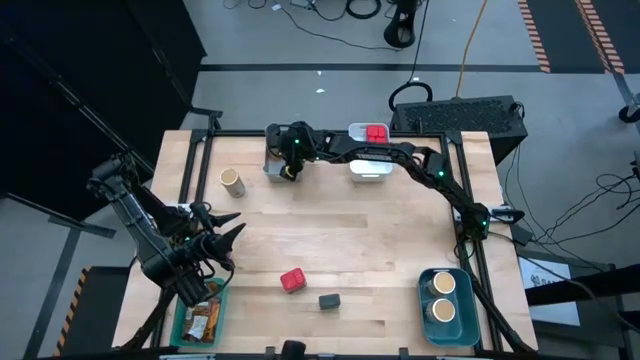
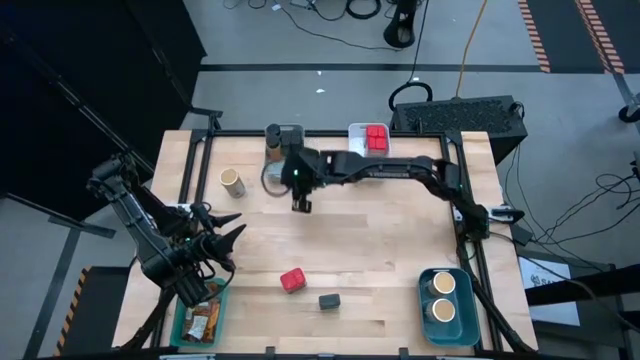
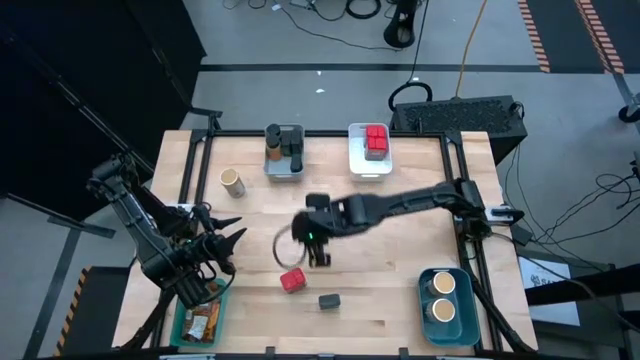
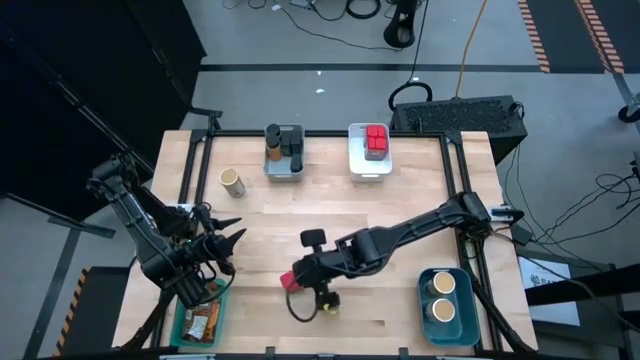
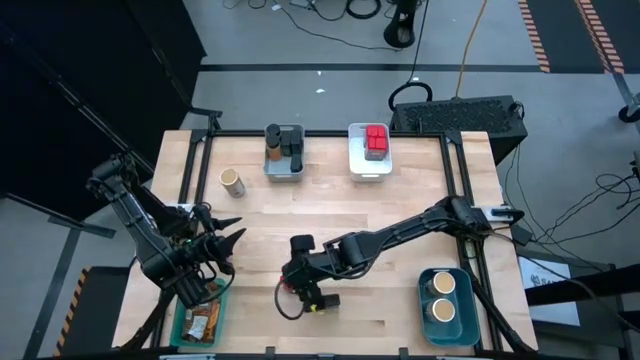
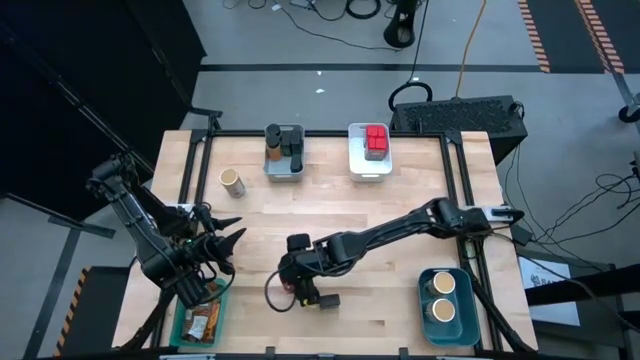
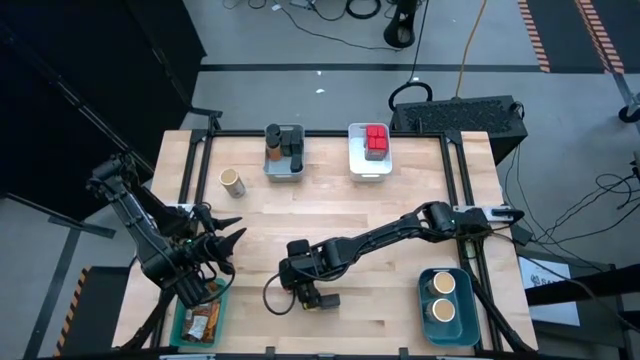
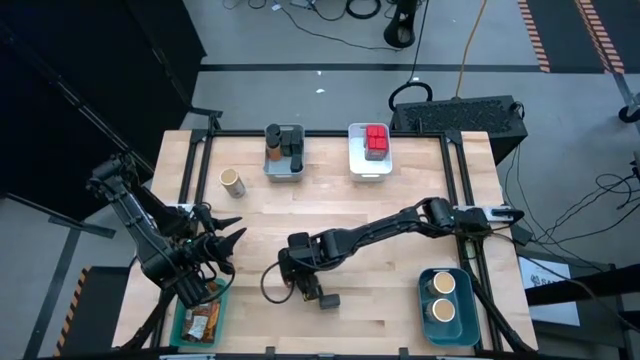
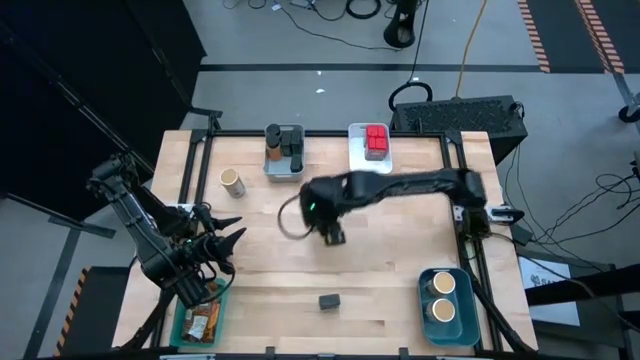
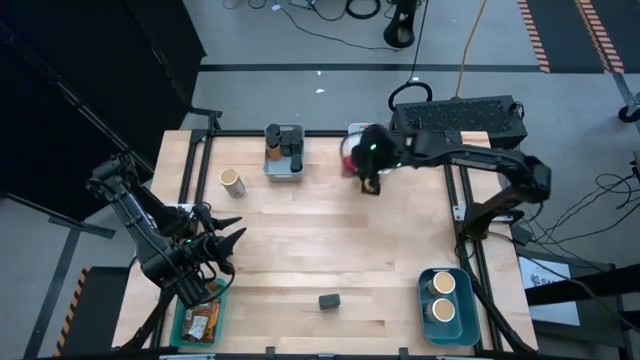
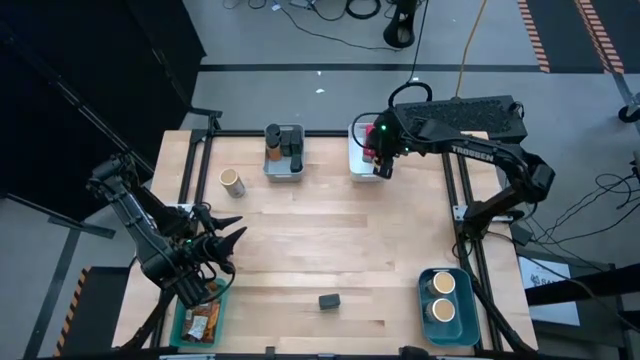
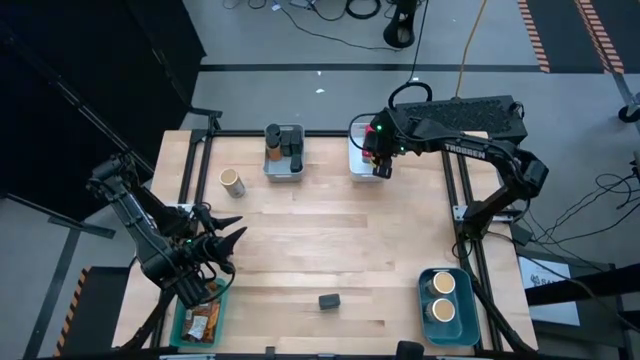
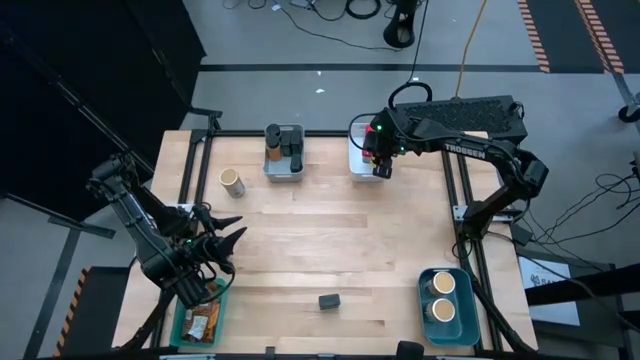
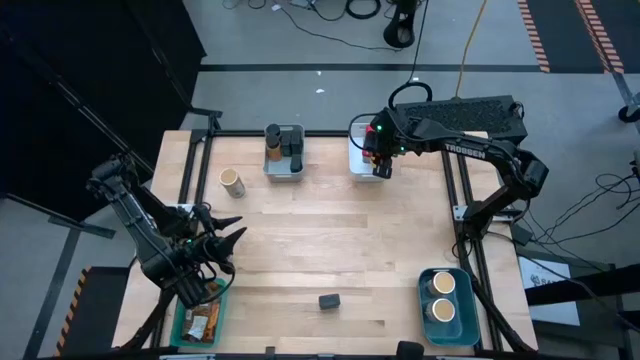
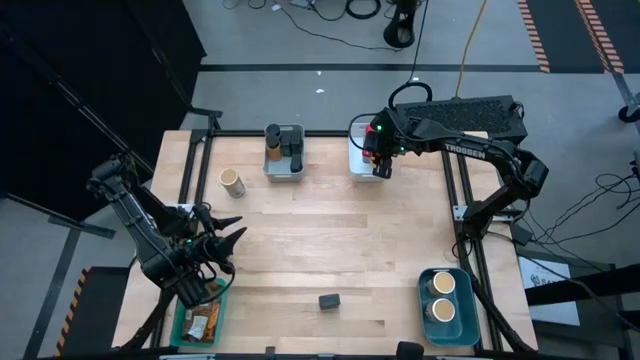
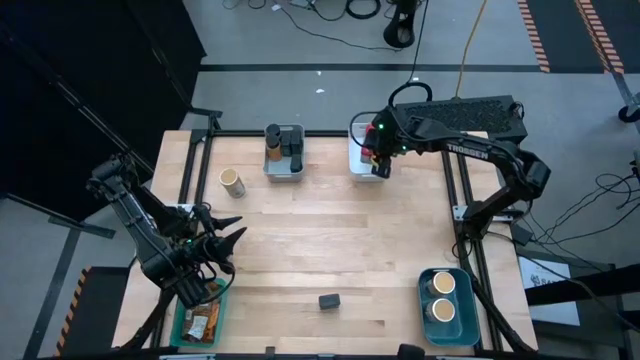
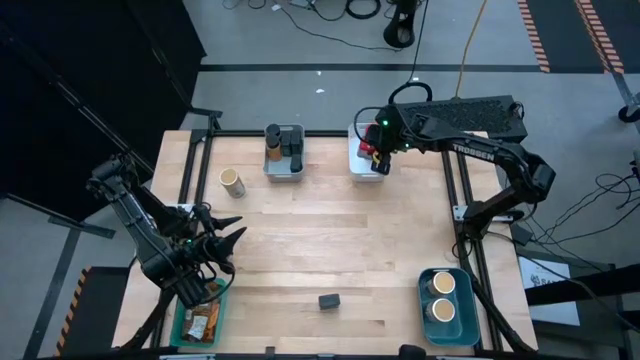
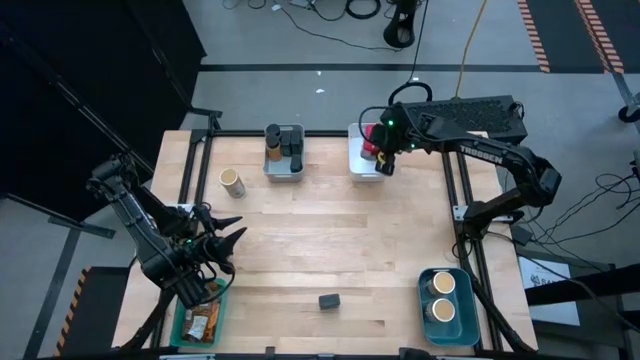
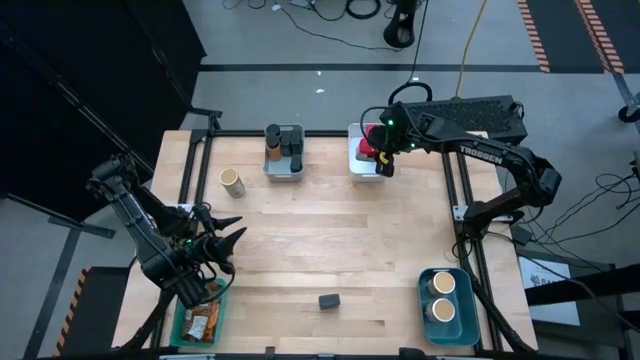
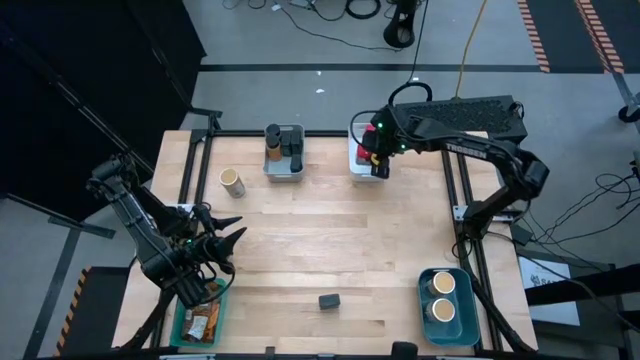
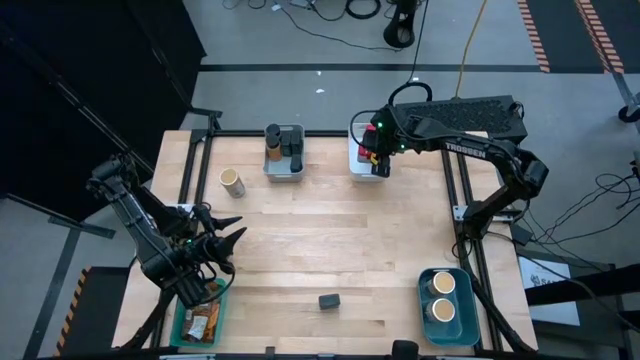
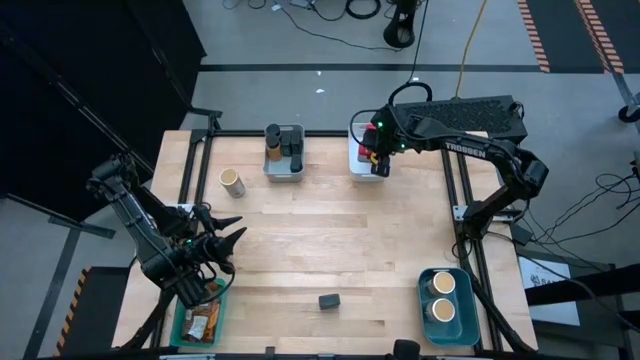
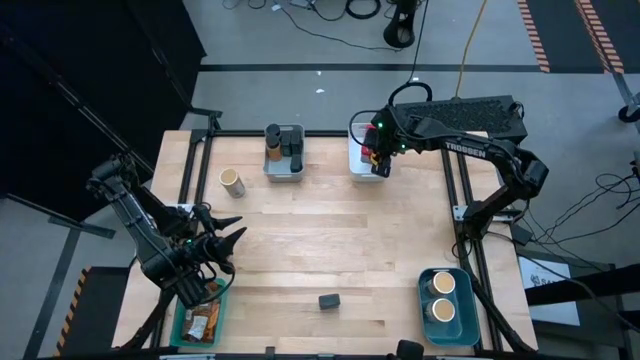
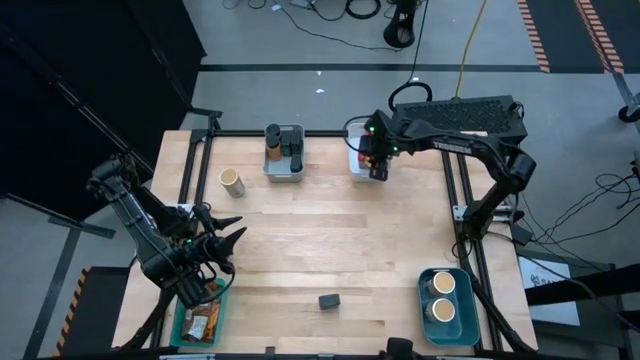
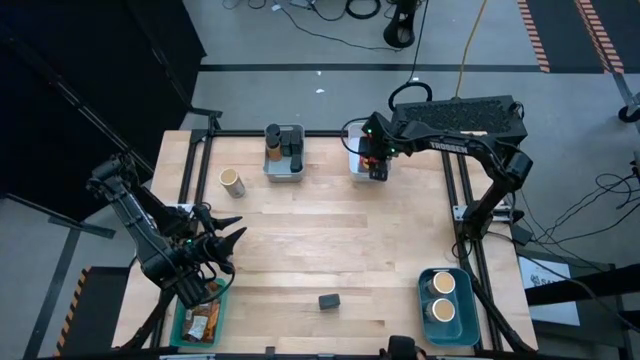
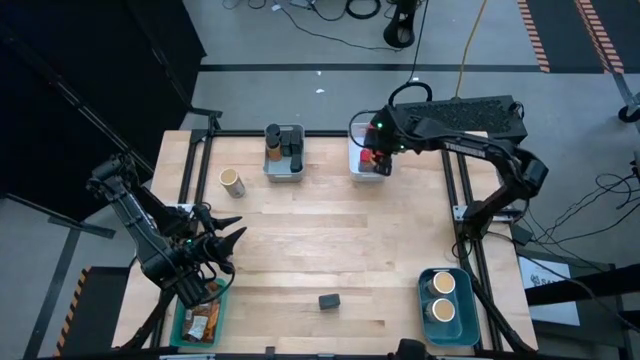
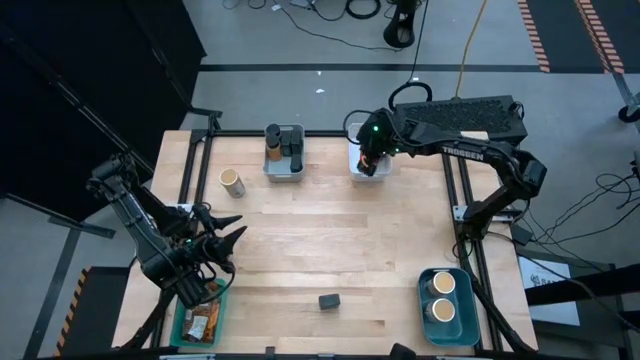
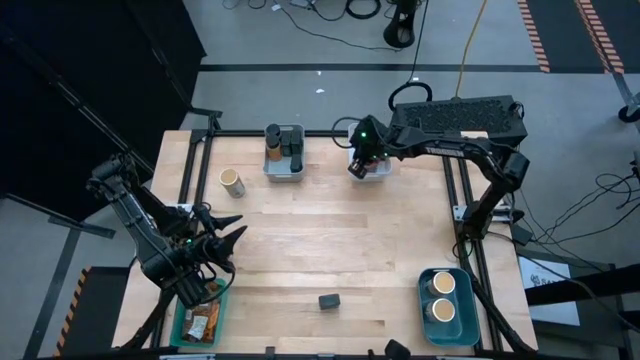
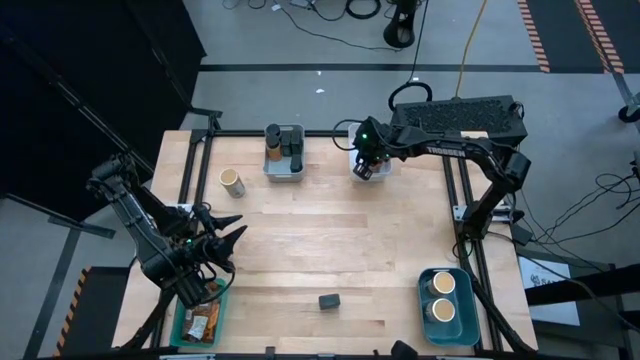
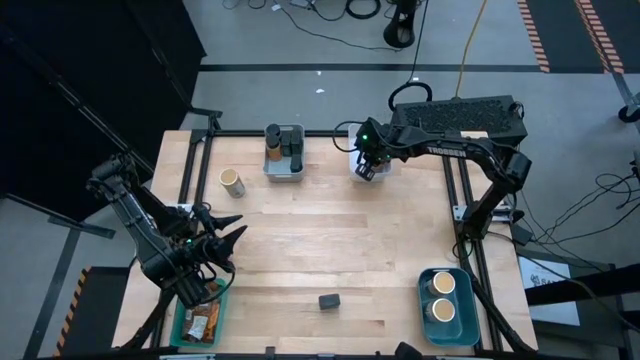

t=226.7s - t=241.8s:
Task: Sort spices by type
Put the red spice can into the white bin

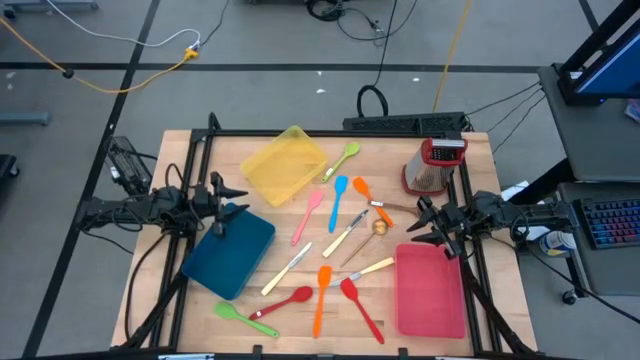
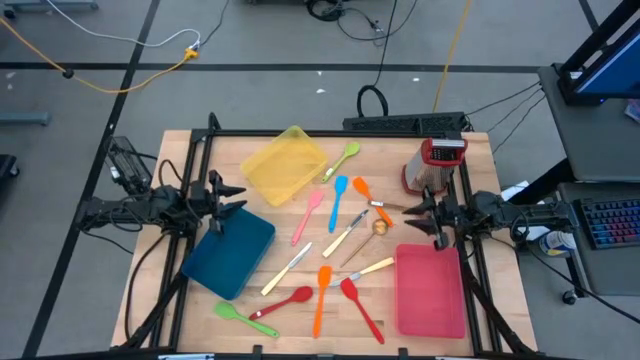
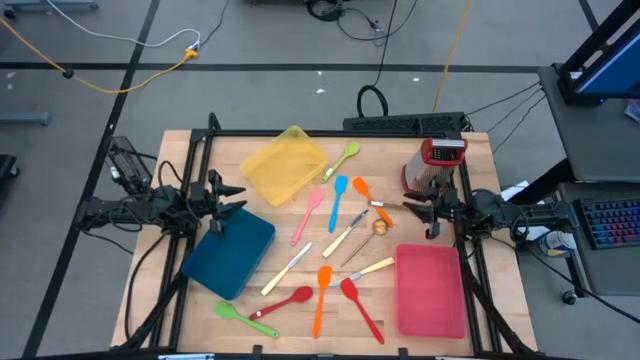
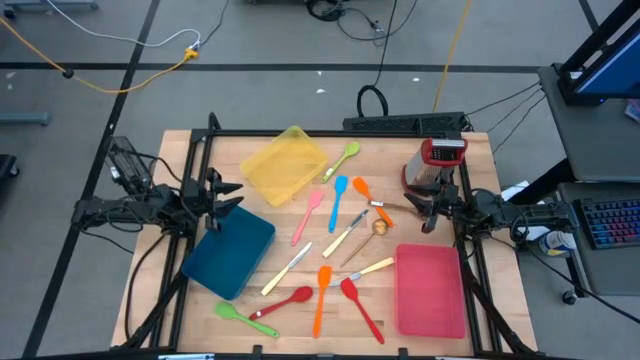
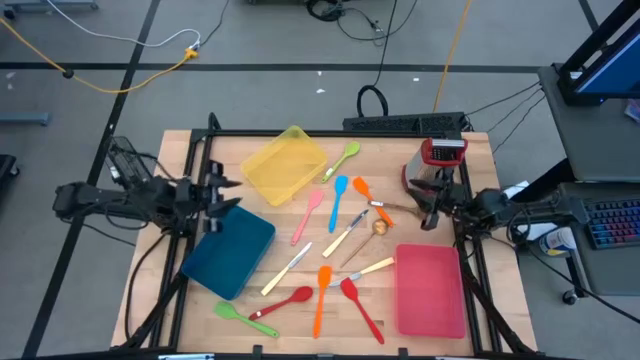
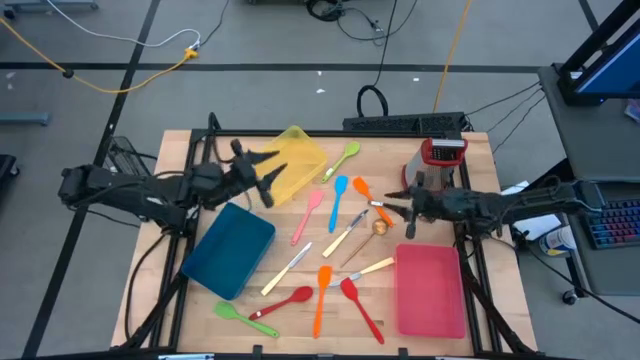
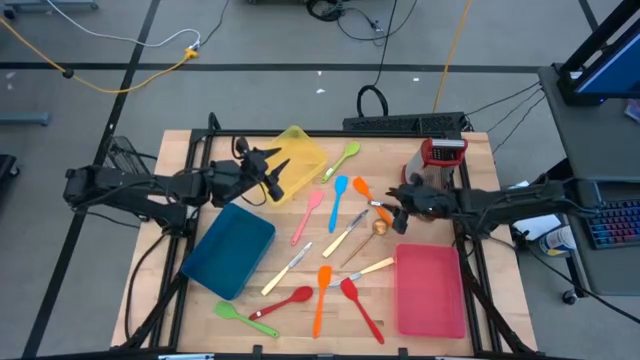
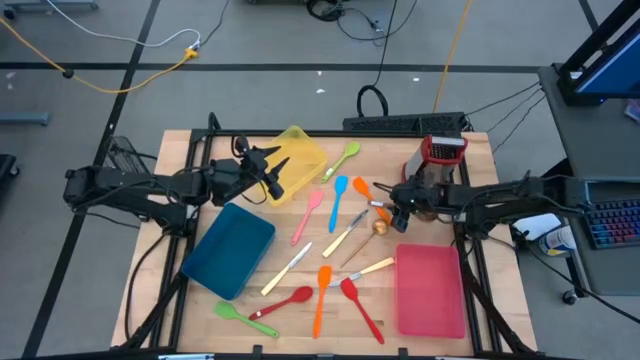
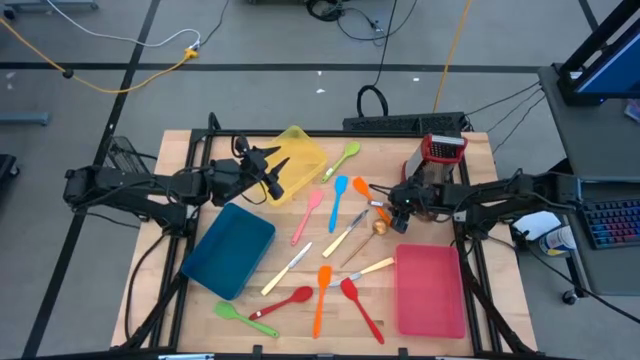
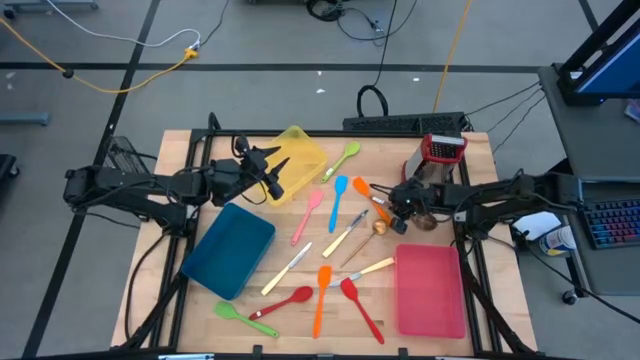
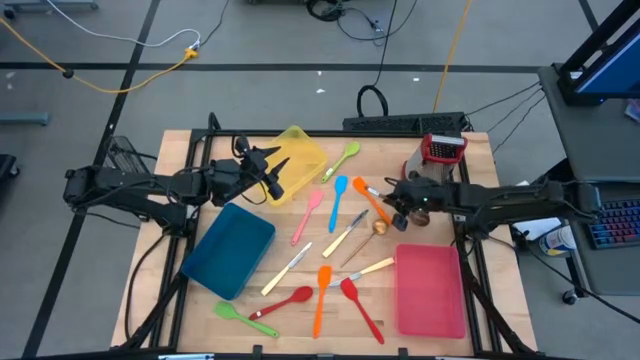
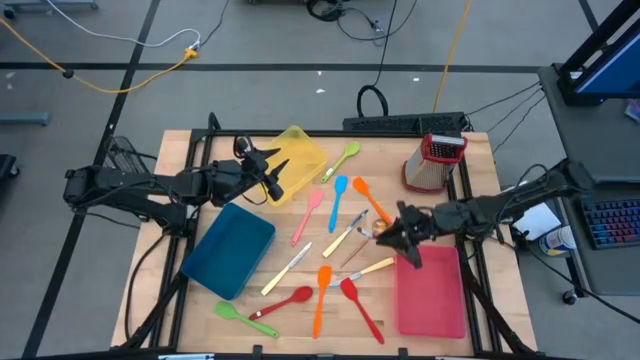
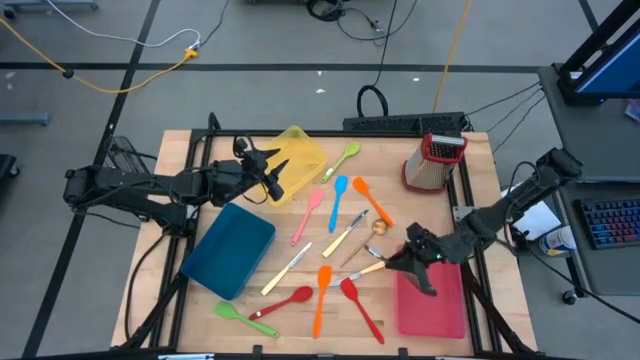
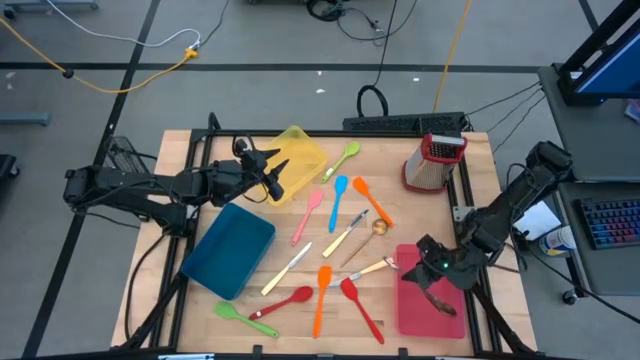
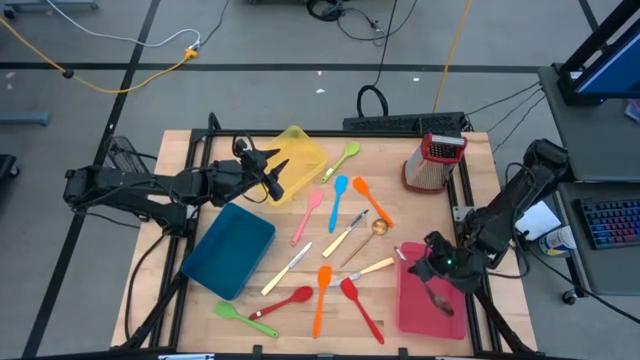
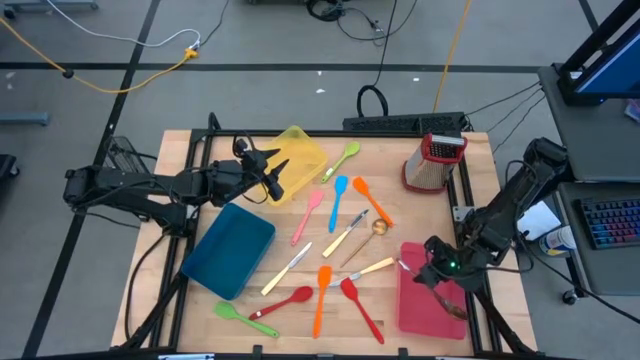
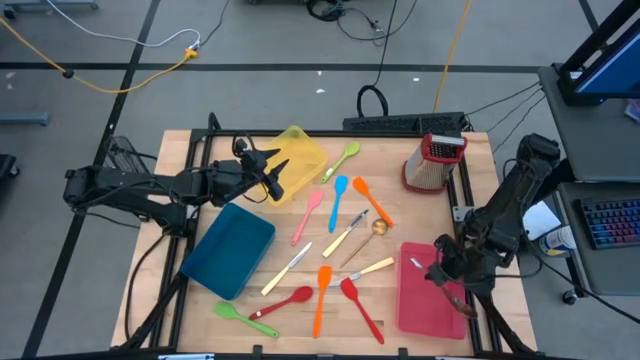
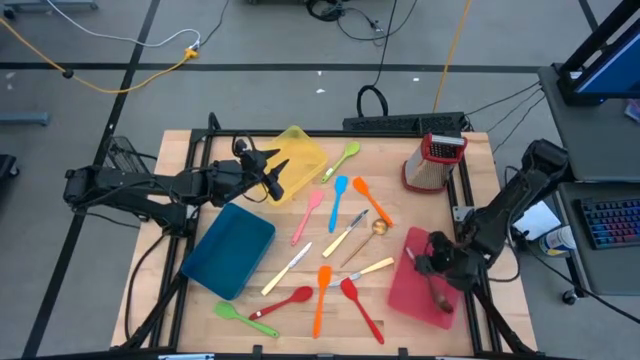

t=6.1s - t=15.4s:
Task: Pick & Place Kitchen Items
Put the brown serving spoon into the pink bin
